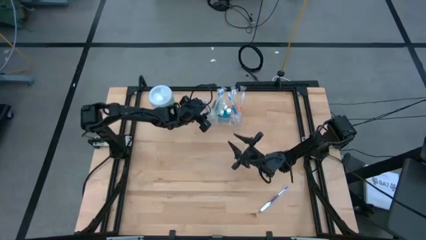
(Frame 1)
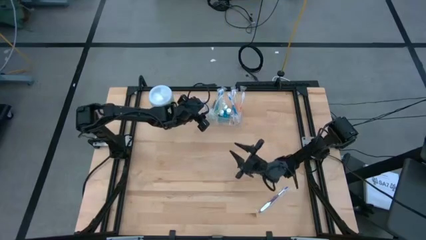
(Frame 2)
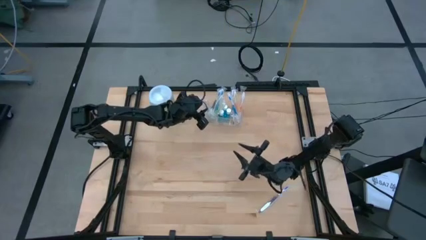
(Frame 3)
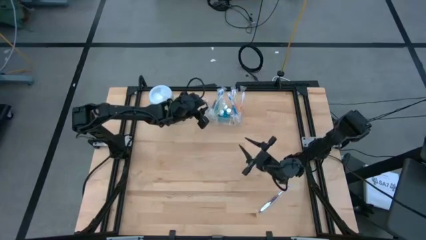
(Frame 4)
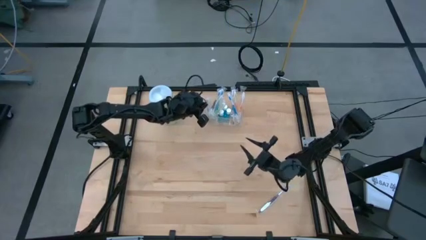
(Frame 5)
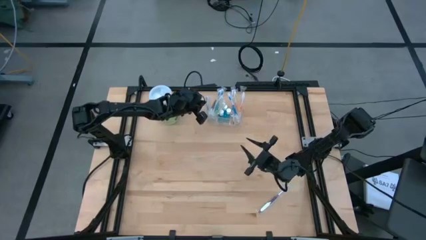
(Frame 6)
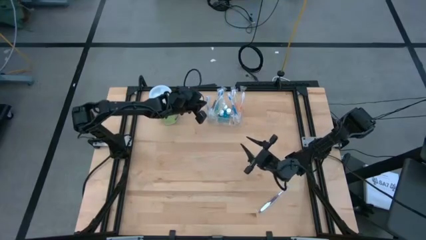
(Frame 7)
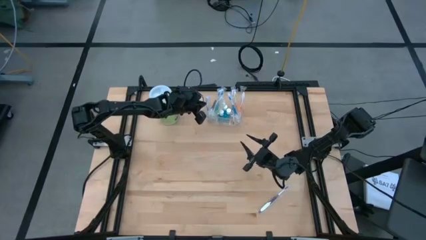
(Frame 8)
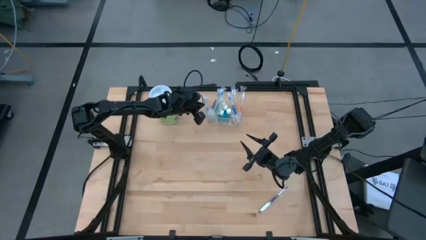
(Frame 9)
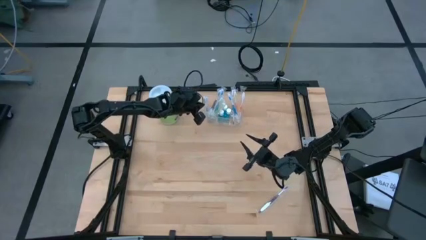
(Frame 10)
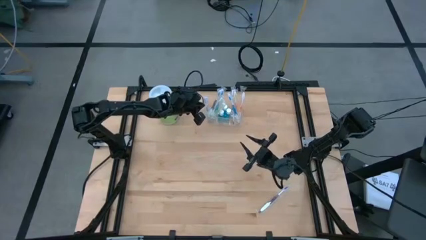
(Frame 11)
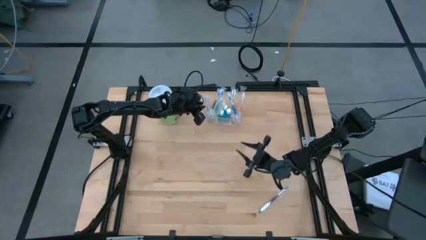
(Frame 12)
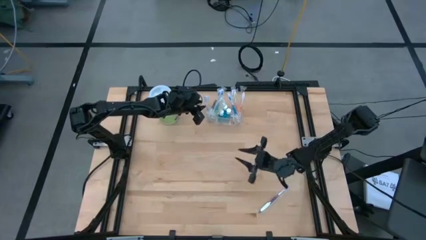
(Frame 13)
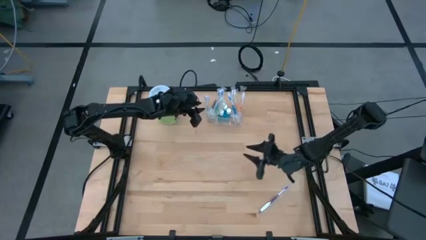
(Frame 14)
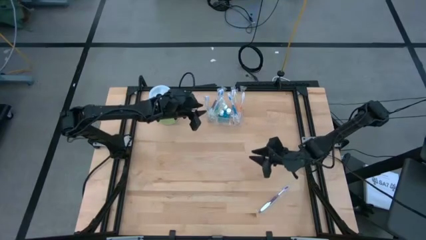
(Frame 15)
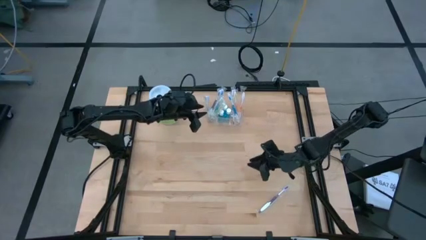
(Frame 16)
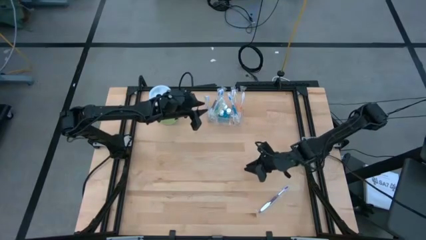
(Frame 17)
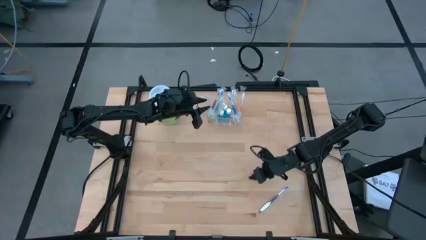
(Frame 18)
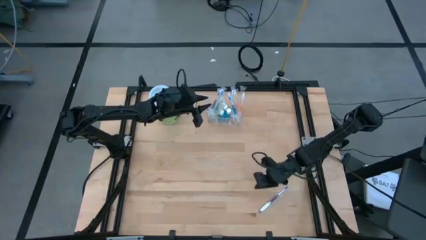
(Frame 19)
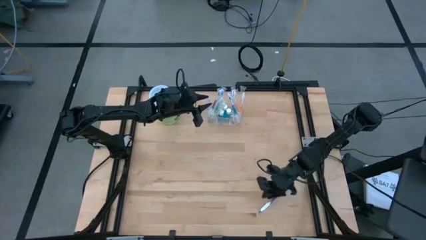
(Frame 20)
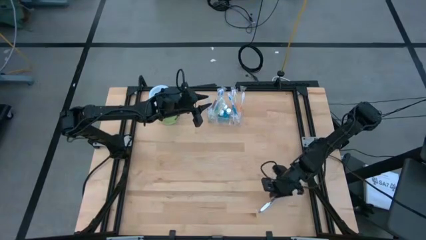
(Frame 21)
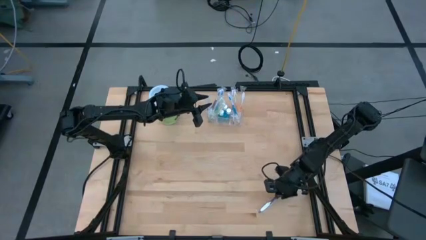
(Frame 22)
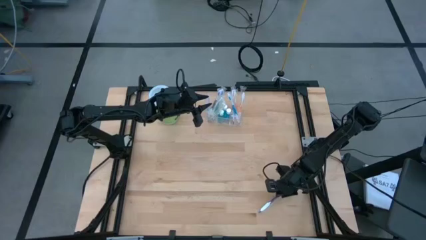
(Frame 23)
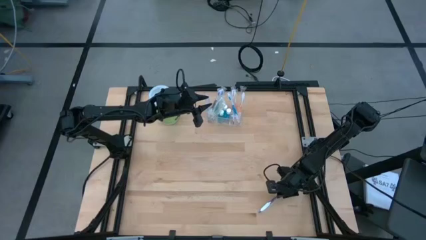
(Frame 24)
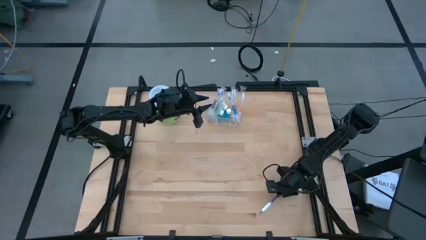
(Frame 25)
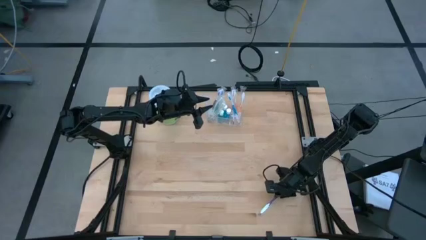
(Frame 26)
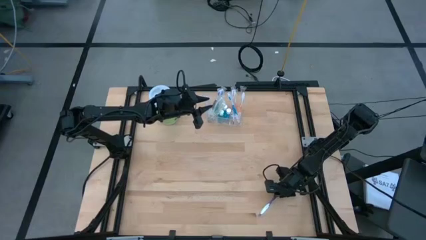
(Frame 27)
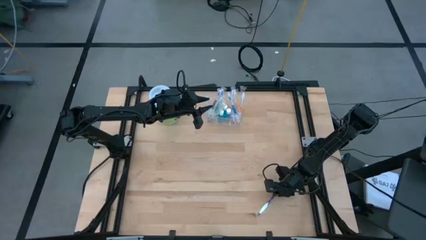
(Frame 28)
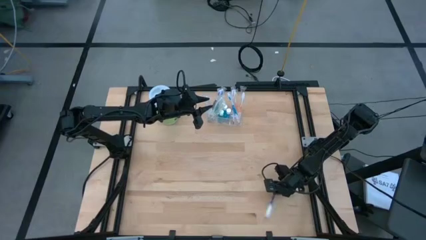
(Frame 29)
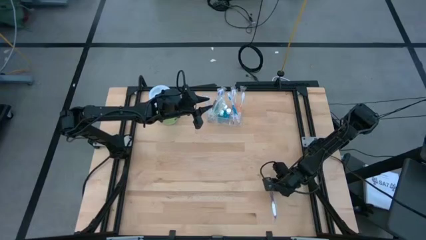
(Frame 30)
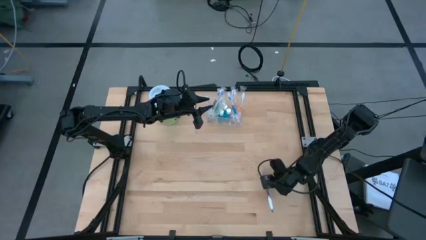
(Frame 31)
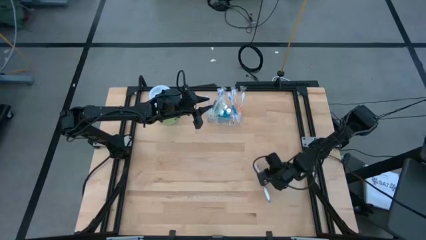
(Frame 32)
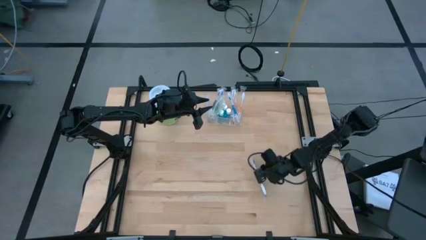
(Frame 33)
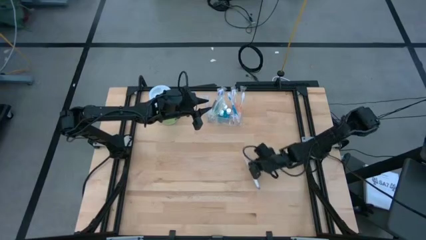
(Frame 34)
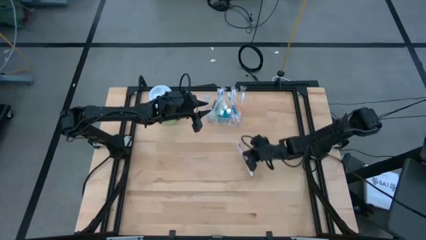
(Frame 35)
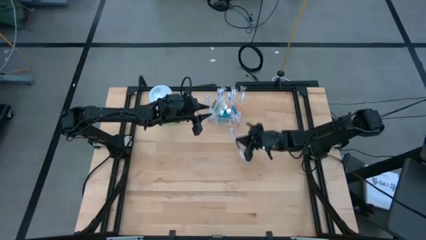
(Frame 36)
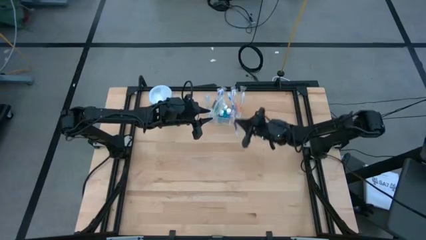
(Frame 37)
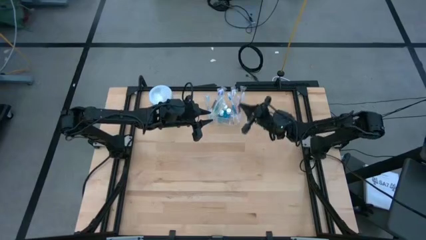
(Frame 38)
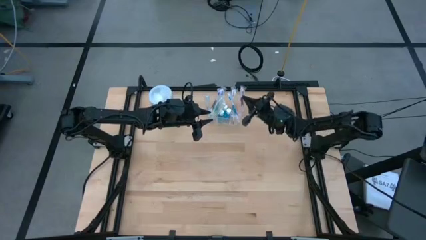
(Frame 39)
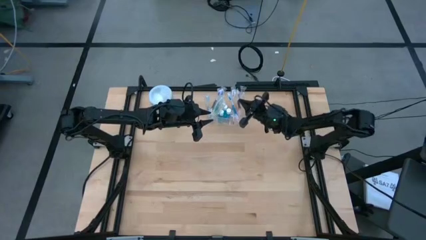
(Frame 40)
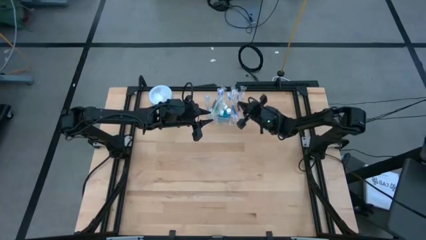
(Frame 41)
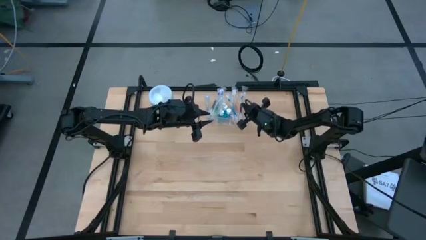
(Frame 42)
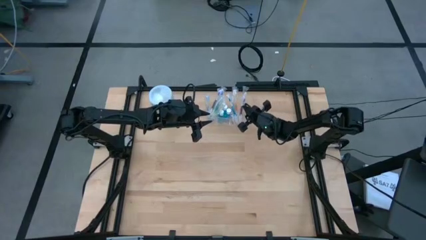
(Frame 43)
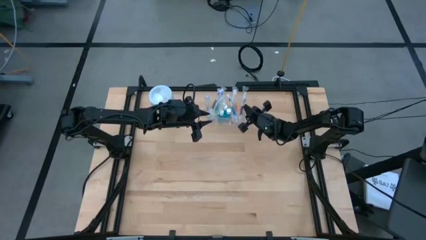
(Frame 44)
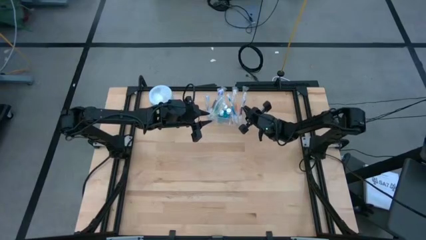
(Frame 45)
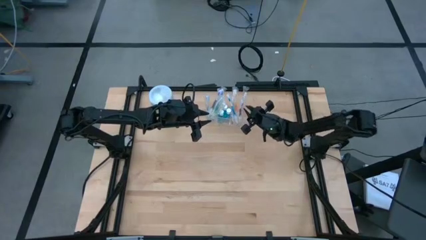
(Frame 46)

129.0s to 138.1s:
Task: Pick & Place toothbrushing station
Put the violet toothbrush into the transparent organizer

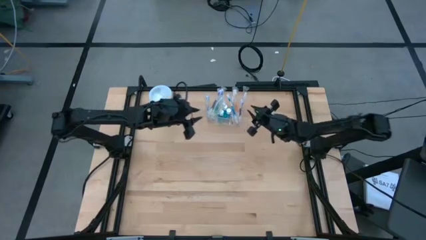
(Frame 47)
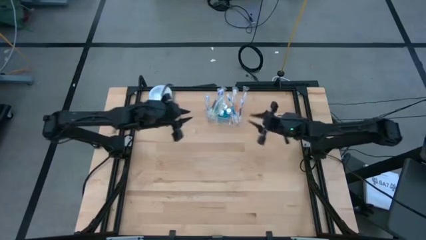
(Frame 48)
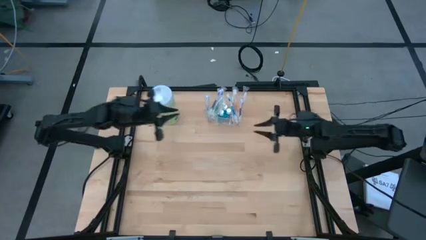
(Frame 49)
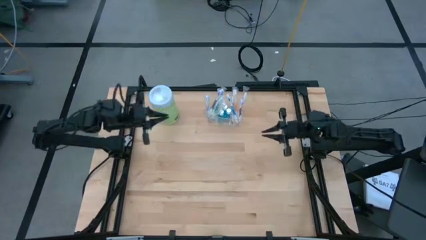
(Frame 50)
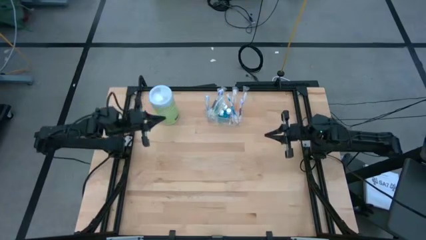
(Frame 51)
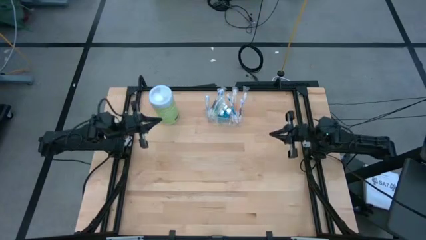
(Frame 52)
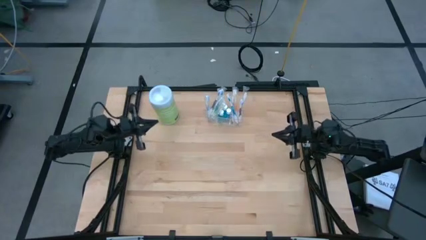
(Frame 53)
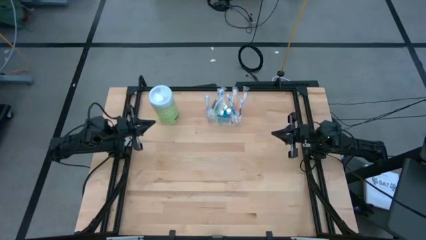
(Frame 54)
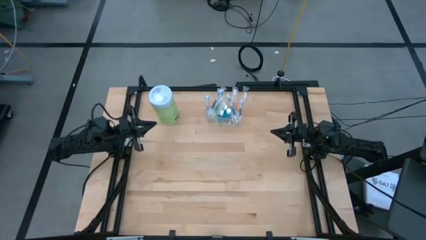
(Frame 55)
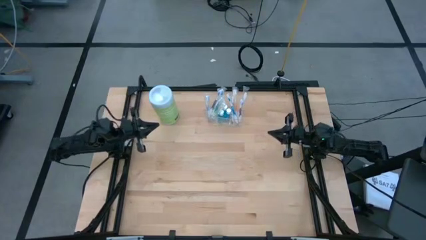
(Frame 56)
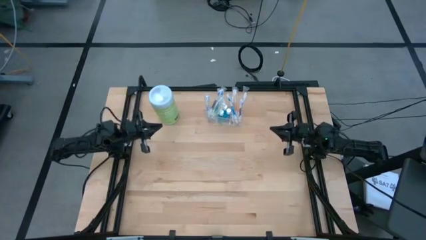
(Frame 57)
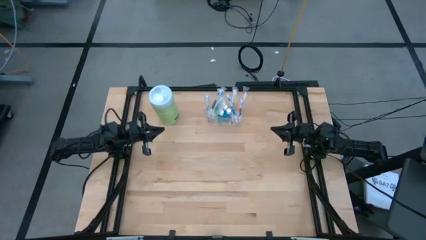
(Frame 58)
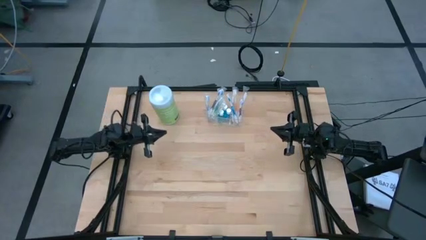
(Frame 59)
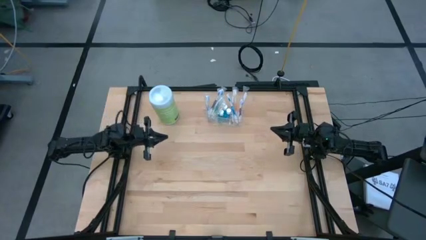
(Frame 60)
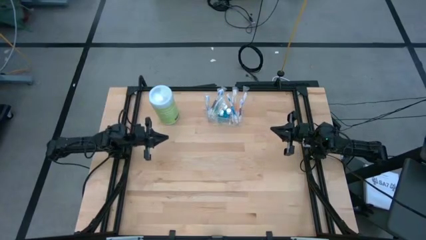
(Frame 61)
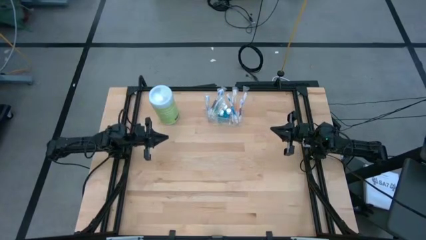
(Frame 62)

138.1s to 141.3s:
Return to home position

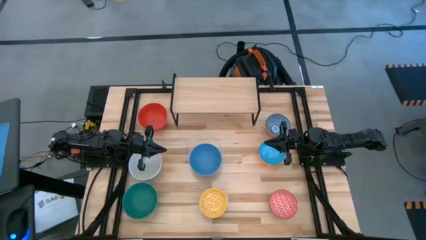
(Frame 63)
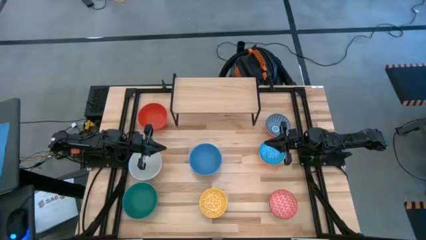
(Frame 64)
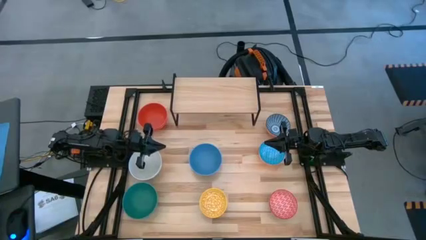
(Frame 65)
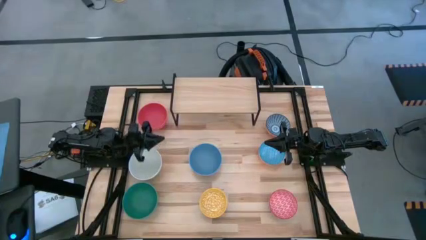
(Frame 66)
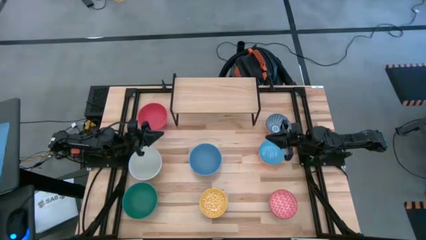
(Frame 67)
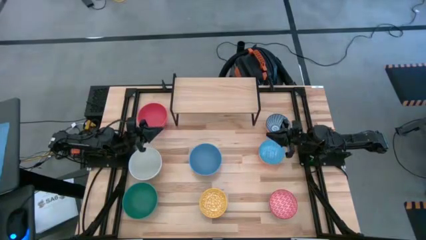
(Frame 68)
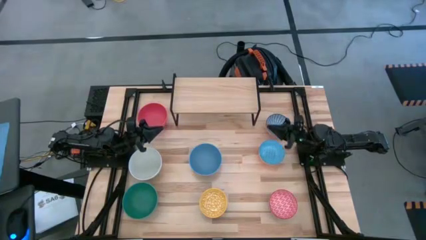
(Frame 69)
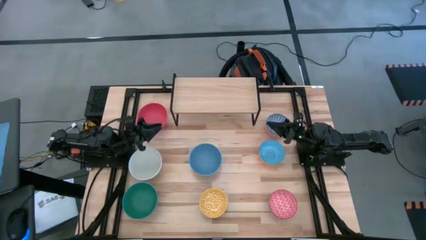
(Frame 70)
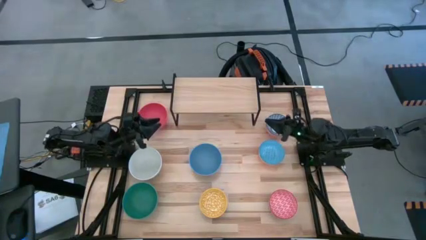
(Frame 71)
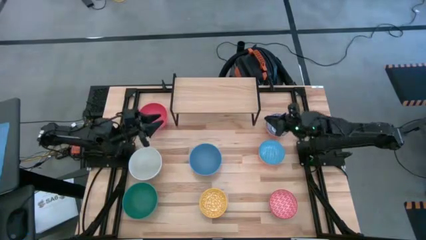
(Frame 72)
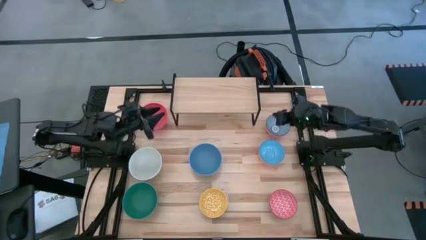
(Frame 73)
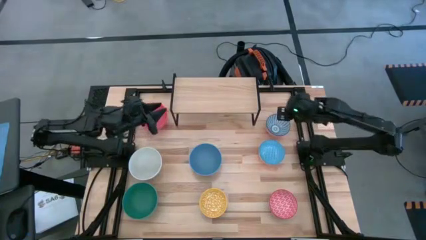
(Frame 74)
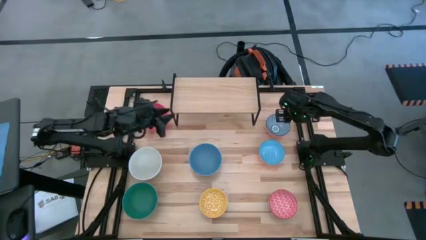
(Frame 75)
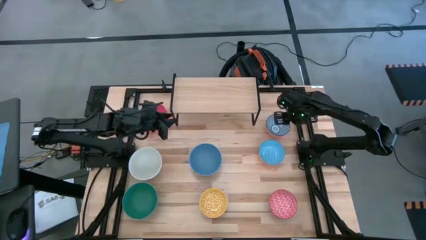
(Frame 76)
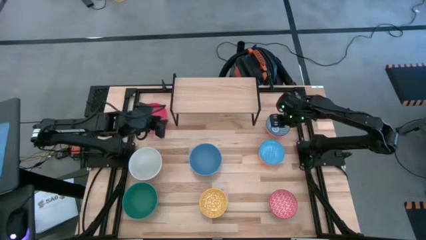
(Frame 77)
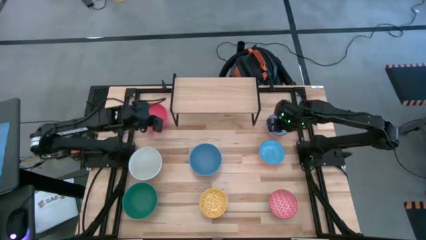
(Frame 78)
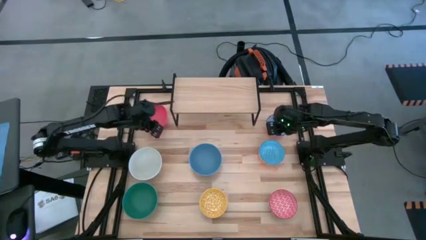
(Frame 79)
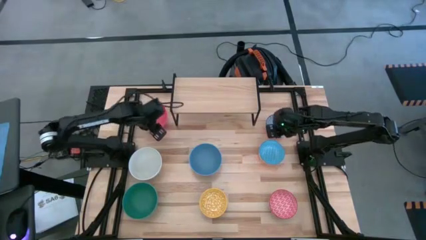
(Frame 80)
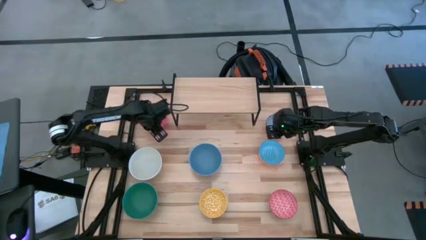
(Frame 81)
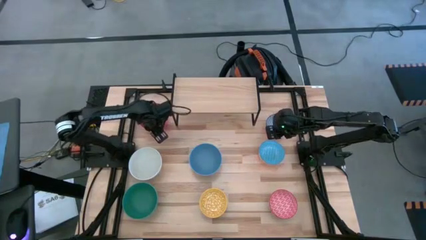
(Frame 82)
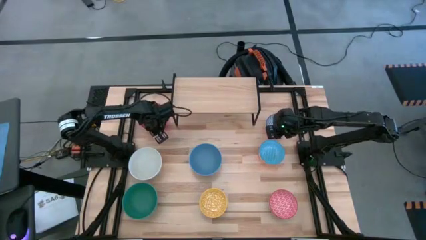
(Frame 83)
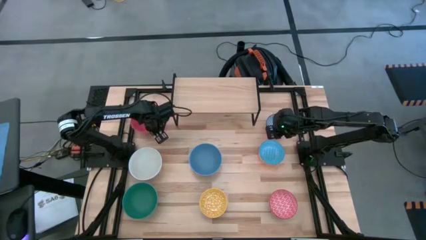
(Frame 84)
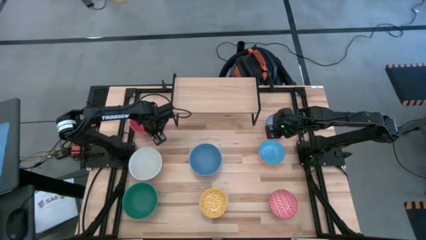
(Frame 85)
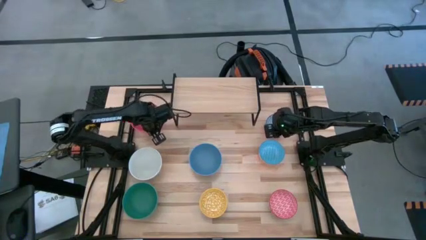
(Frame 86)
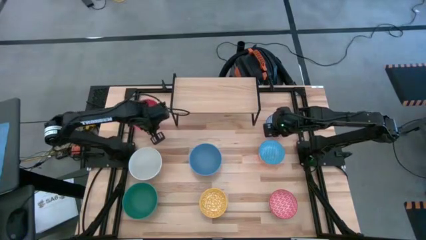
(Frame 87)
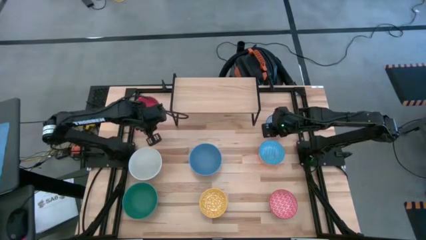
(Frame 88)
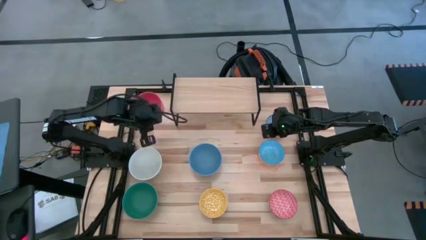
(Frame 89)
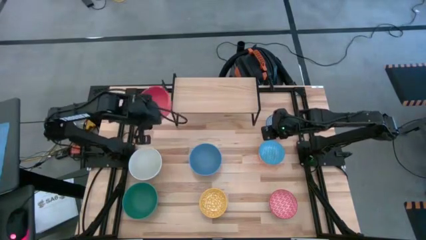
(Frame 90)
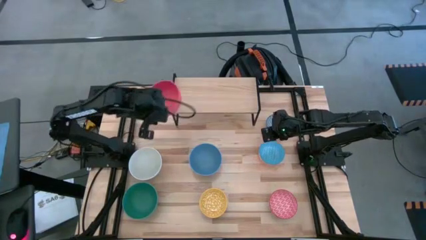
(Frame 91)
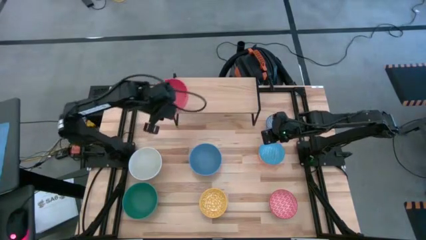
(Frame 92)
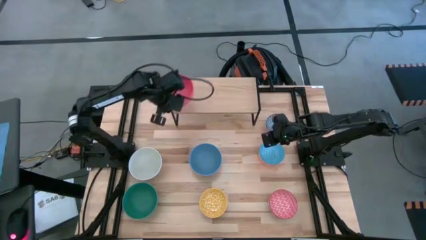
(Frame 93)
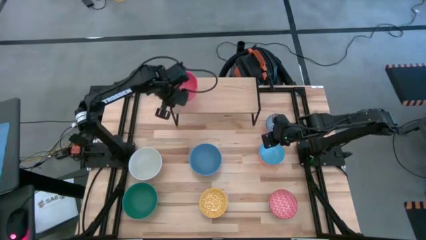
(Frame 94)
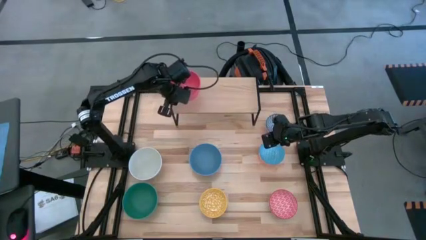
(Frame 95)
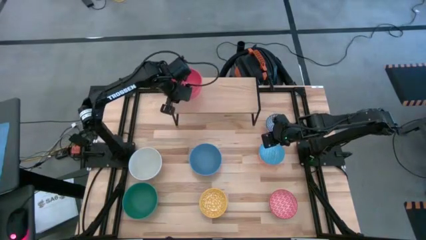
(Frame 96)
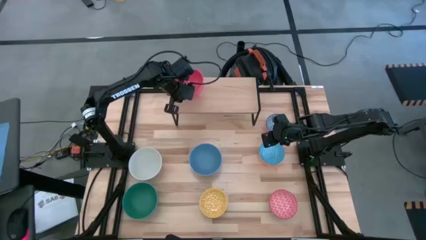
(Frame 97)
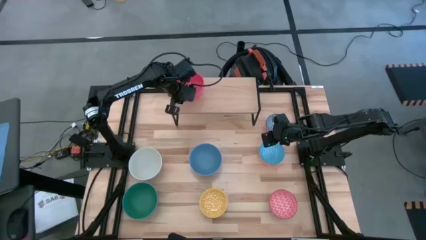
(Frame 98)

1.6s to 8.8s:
Task: Place and stack bowls onto a shelf
Put the orange bowl on the shelf
